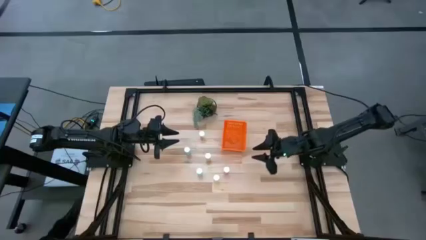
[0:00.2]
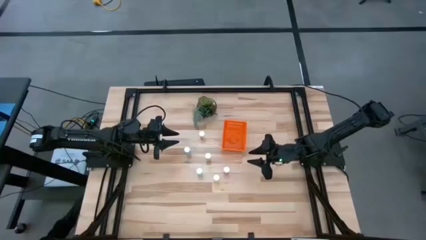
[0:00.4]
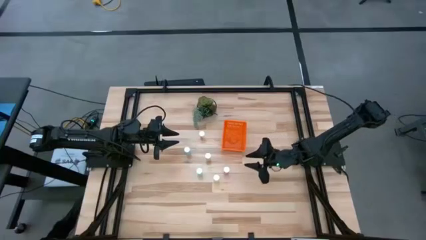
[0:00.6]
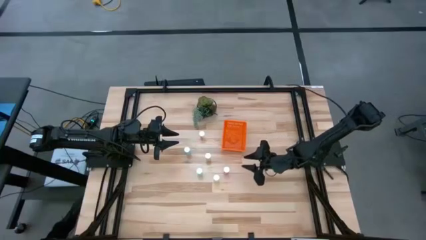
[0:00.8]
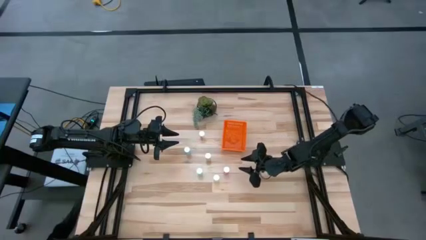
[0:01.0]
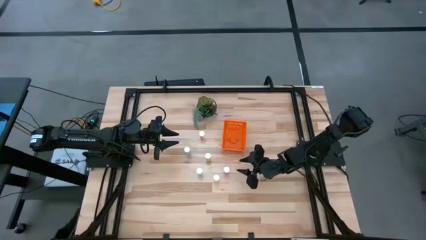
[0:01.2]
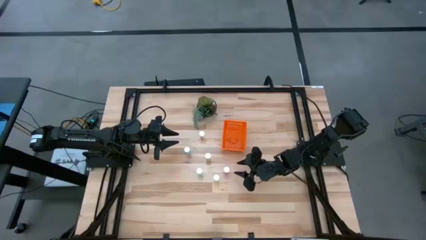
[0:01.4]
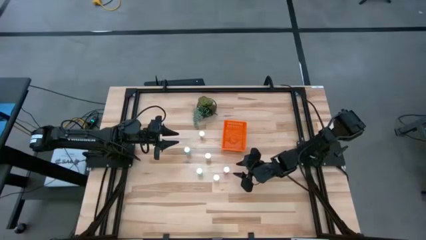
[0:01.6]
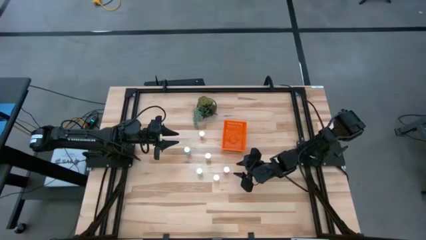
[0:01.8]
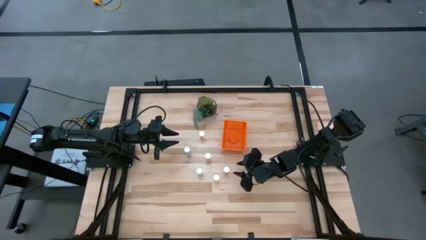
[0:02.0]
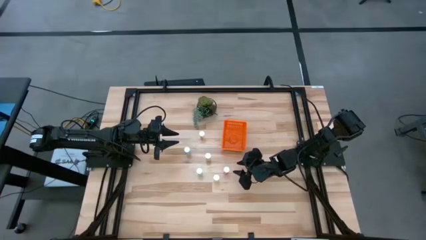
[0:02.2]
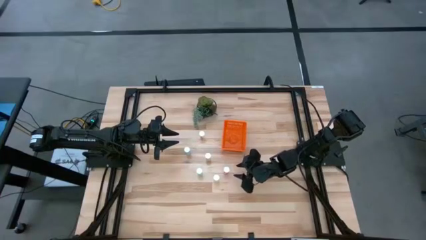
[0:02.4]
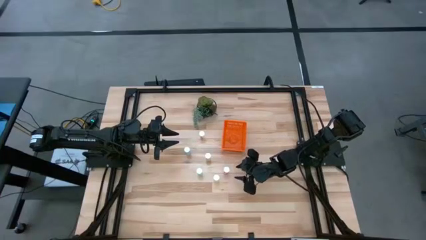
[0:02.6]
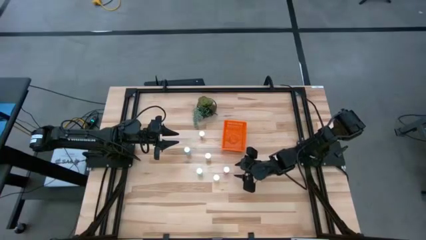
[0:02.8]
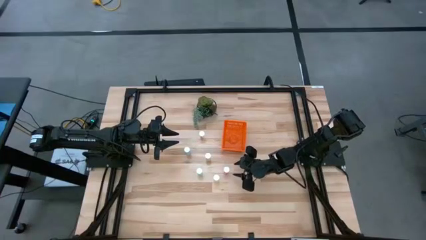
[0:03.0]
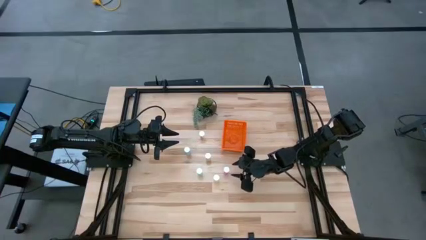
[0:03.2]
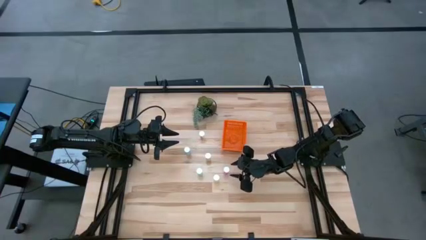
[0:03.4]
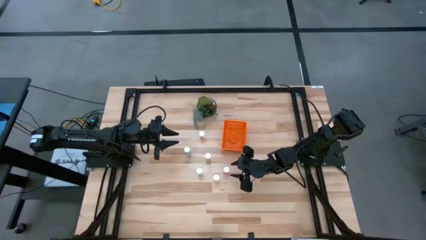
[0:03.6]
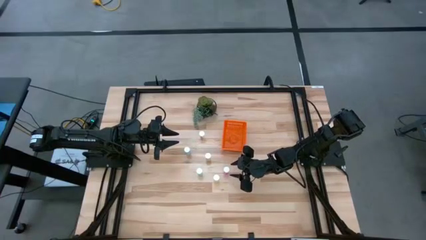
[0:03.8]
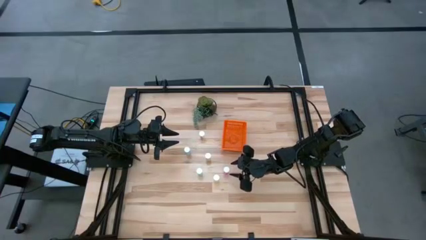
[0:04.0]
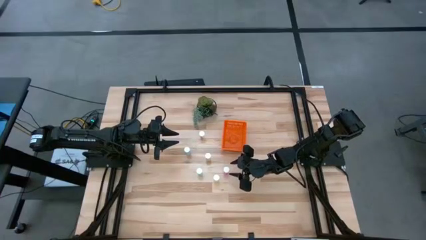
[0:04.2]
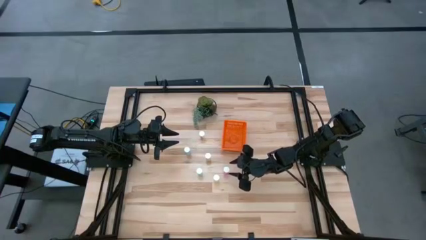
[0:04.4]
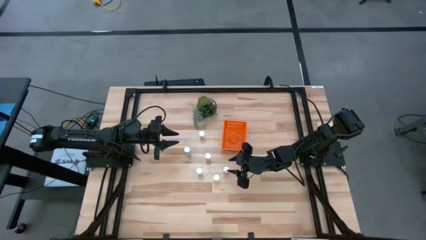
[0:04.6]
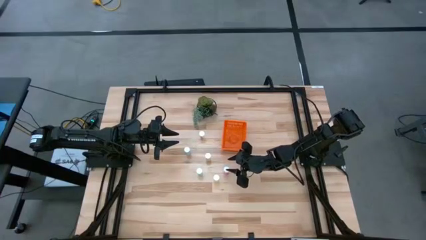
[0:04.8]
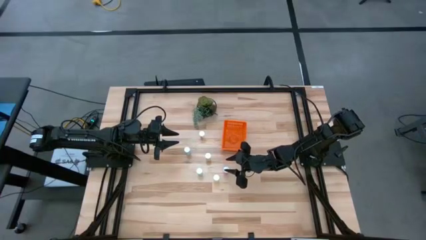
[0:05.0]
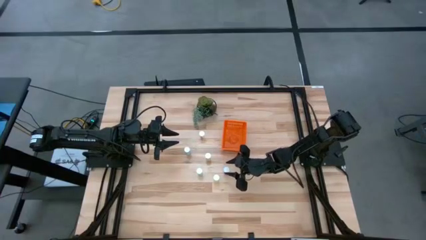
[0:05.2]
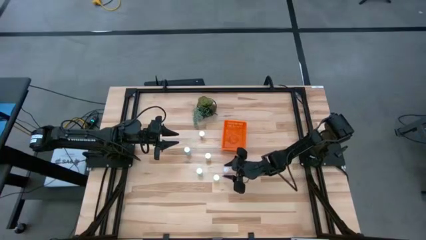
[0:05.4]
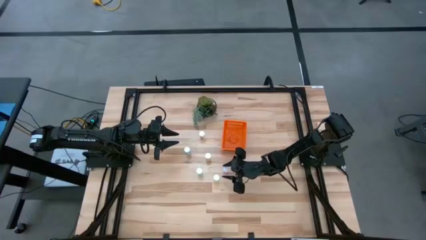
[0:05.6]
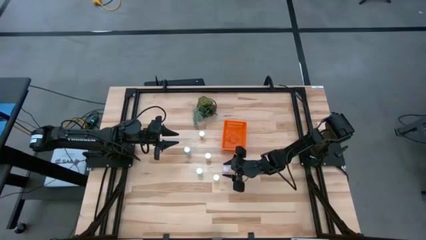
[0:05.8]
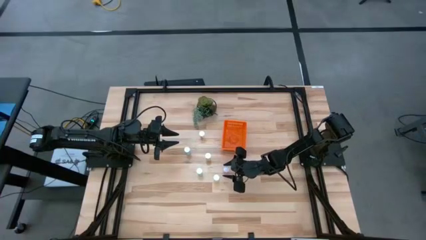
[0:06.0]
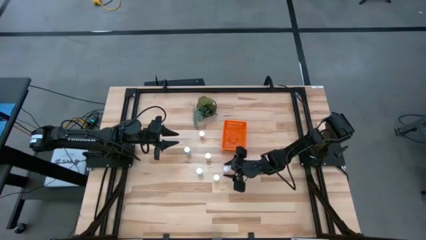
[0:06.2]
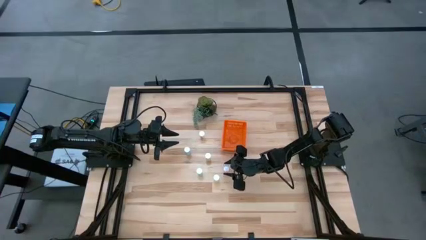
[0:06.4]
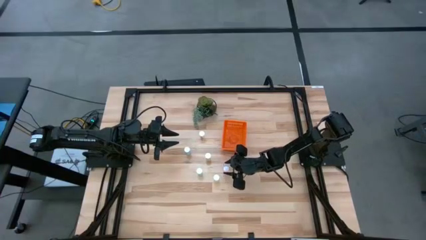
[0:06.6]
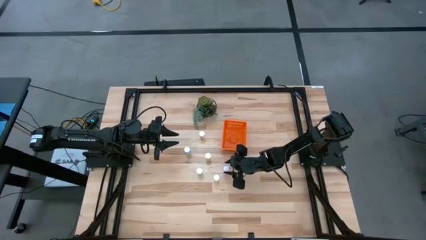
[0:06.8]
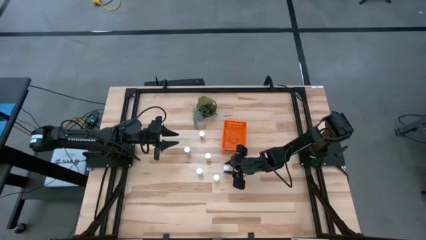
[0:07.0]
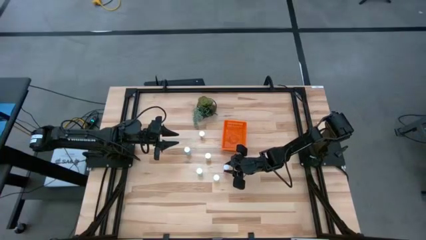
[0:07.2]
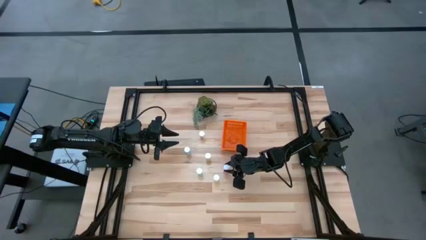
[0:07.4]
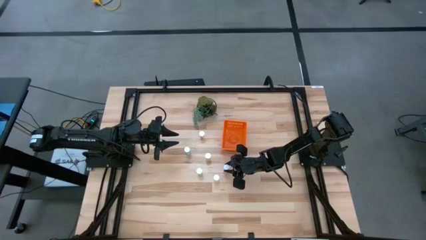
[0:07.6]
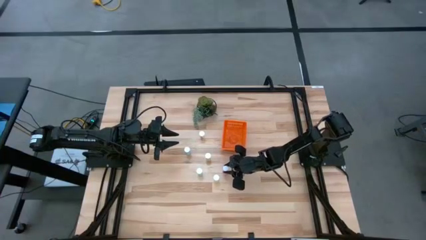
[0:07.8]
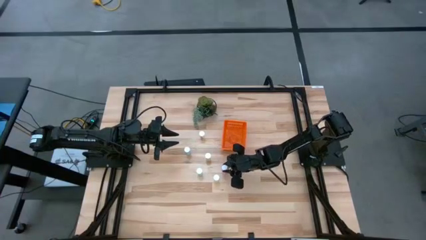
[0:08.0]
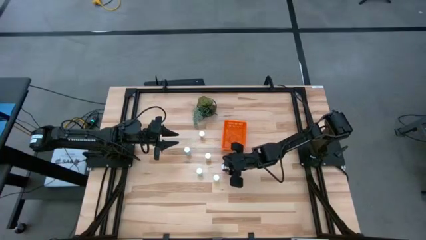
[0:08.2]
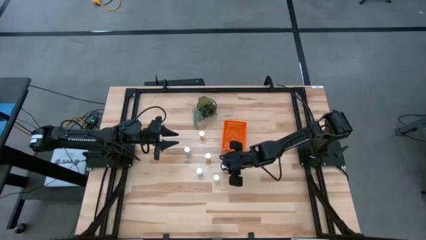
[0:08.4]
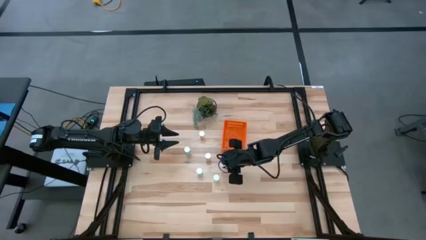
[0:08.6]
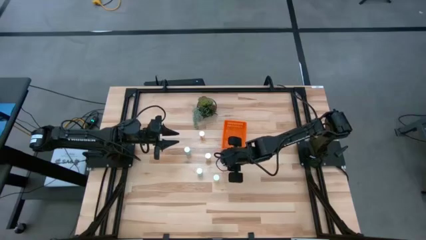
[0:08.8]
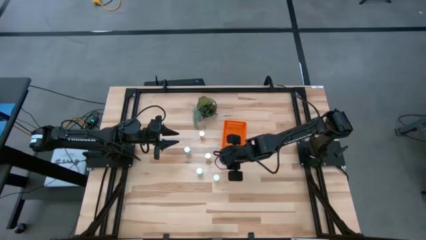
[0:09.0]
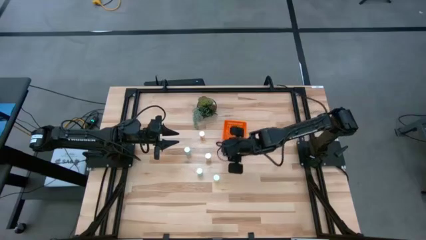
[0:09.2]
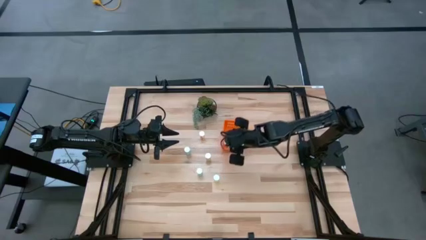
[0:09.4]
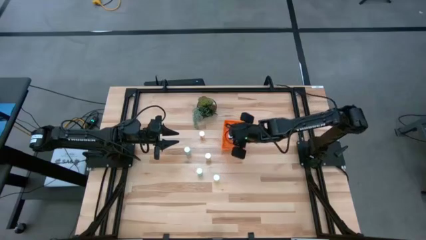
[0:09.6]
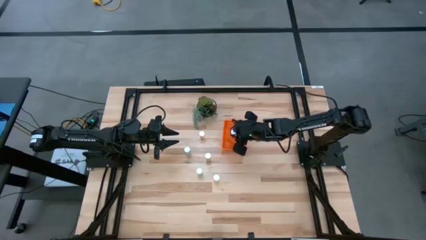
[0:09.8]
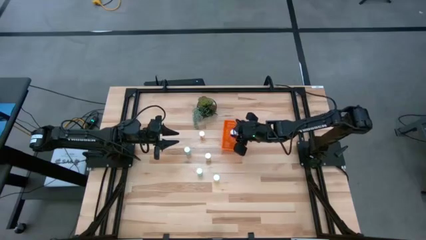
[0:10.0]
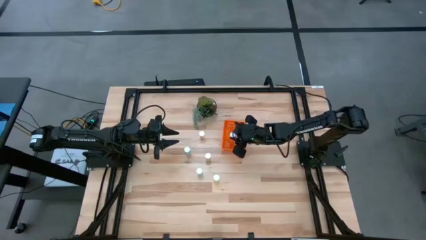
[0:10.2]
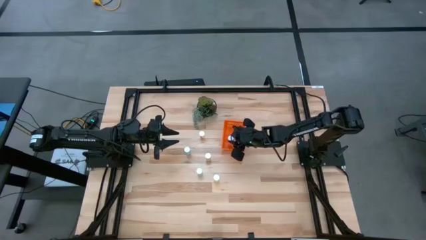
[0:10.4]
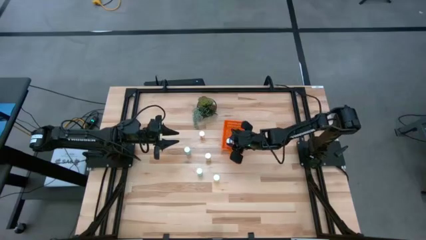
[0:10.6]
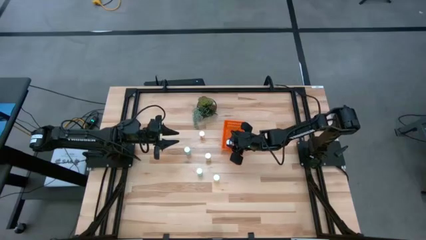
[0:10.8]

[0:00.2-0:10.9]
Task: Pick and place pill bottles into a basket
Put the red pill bottle into the basket
